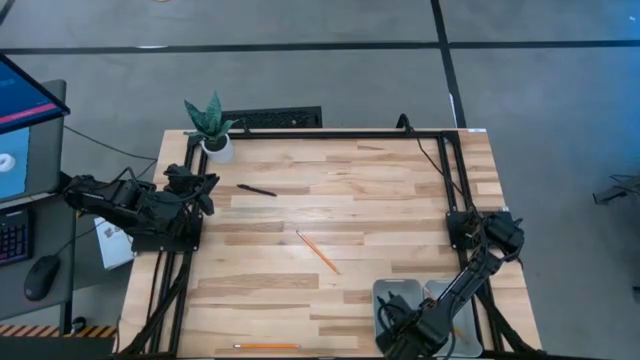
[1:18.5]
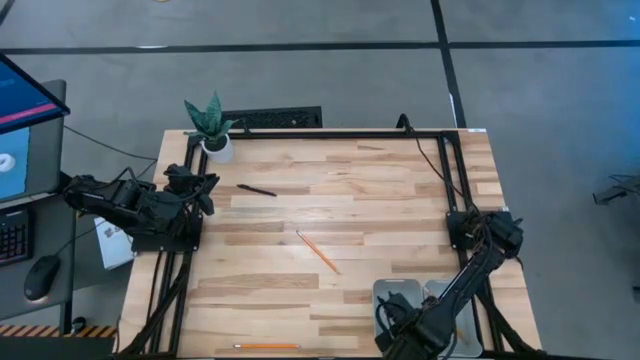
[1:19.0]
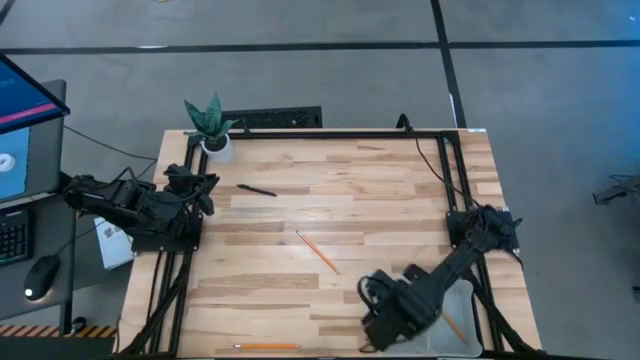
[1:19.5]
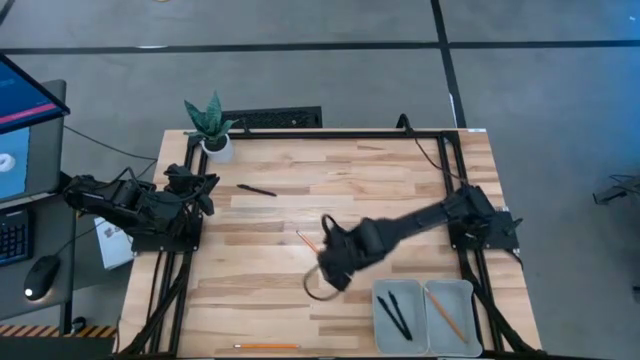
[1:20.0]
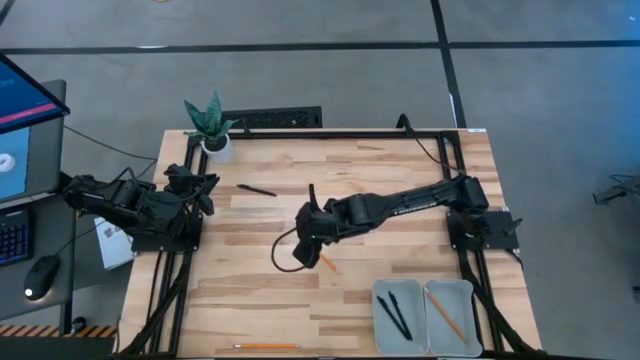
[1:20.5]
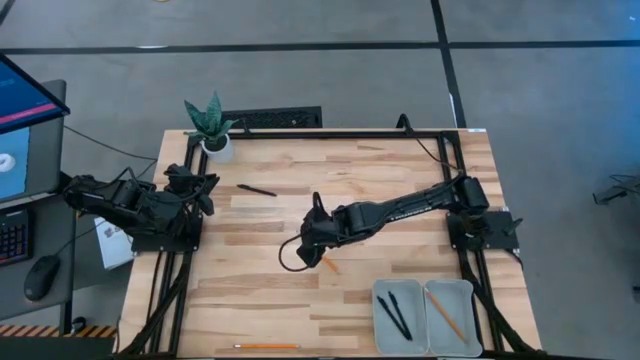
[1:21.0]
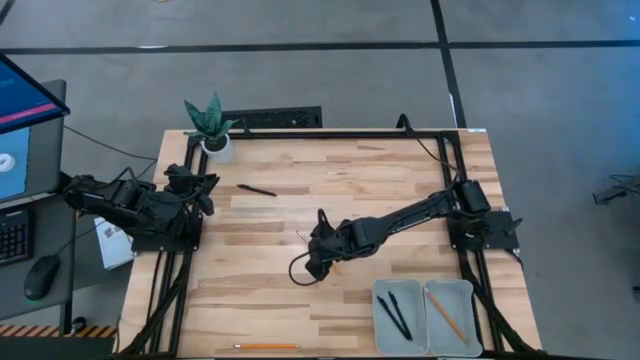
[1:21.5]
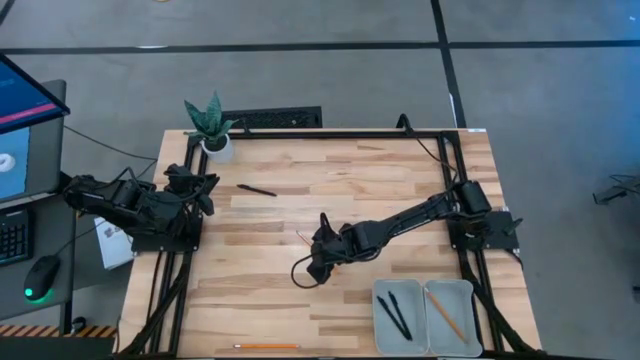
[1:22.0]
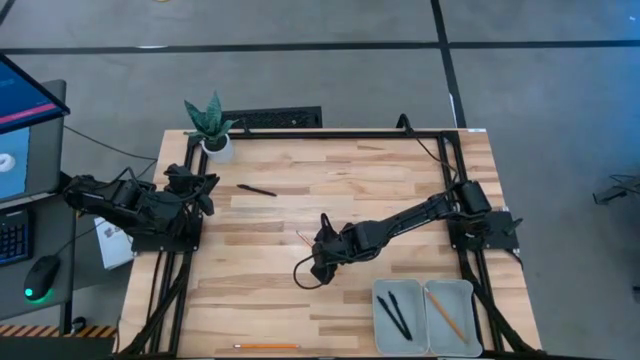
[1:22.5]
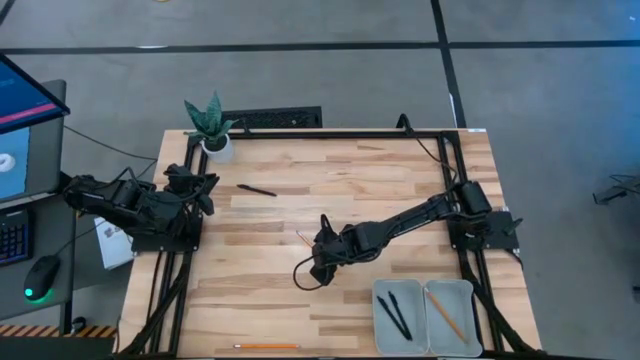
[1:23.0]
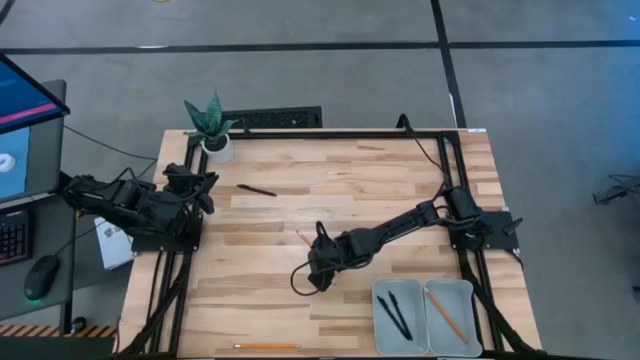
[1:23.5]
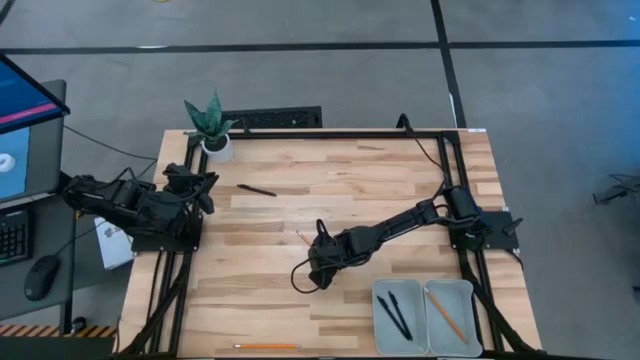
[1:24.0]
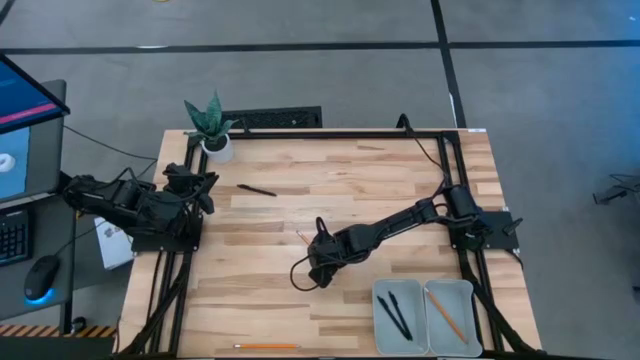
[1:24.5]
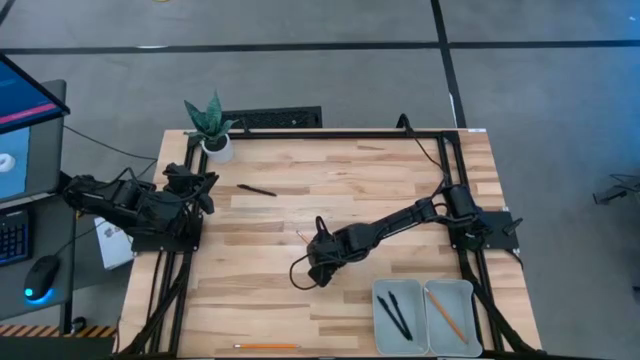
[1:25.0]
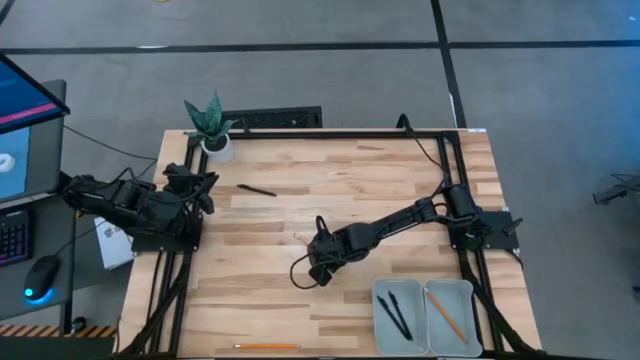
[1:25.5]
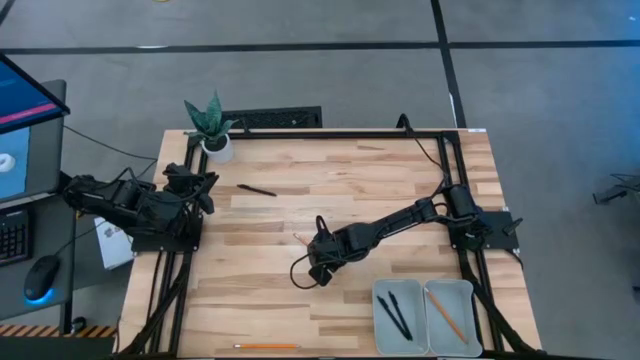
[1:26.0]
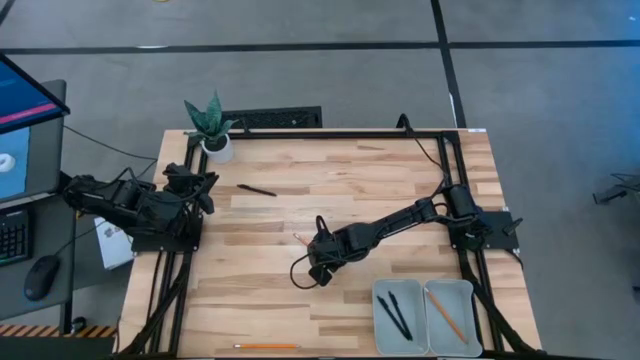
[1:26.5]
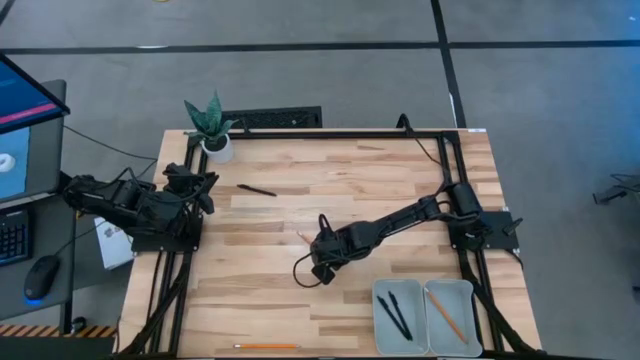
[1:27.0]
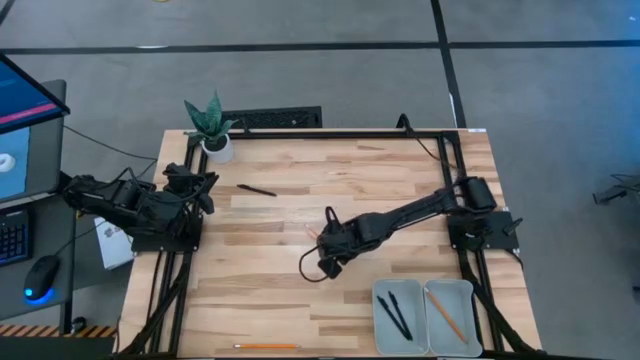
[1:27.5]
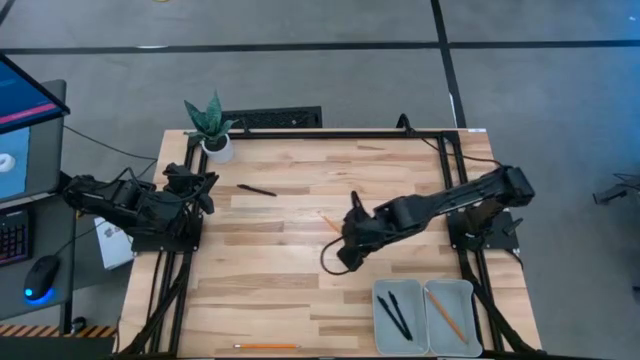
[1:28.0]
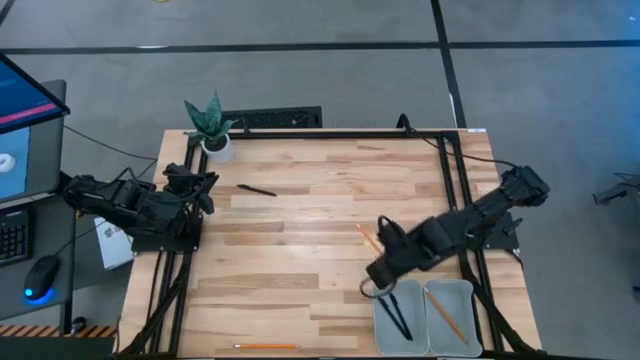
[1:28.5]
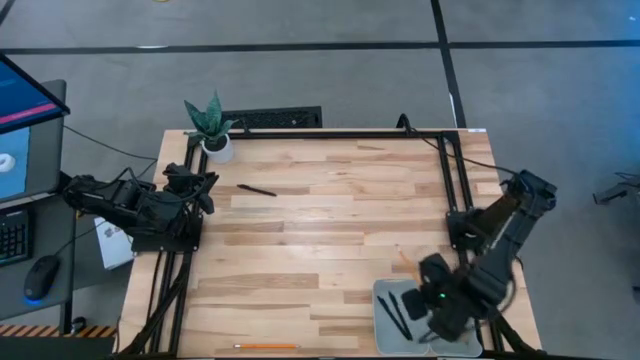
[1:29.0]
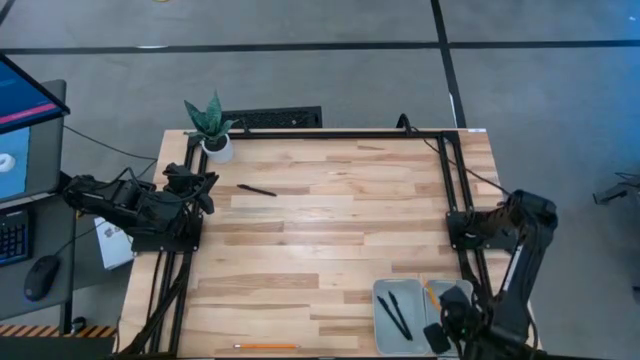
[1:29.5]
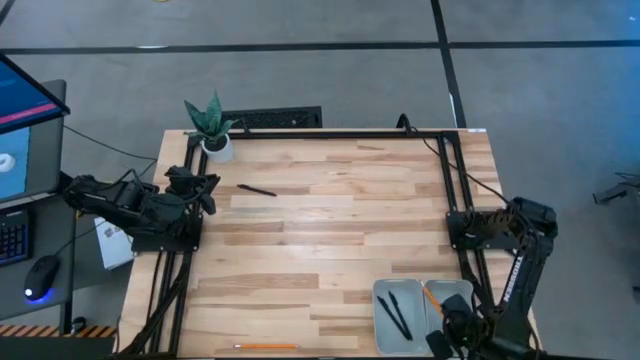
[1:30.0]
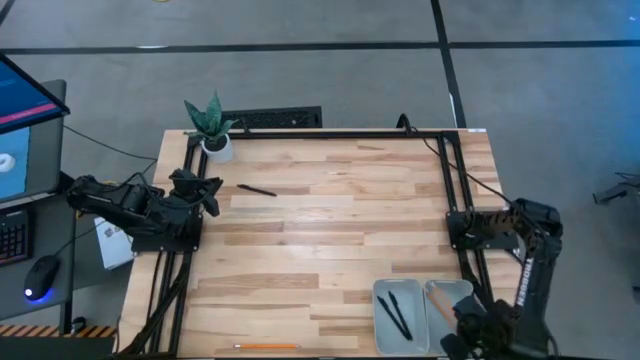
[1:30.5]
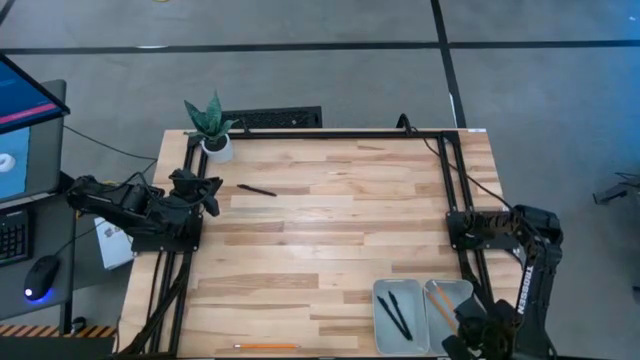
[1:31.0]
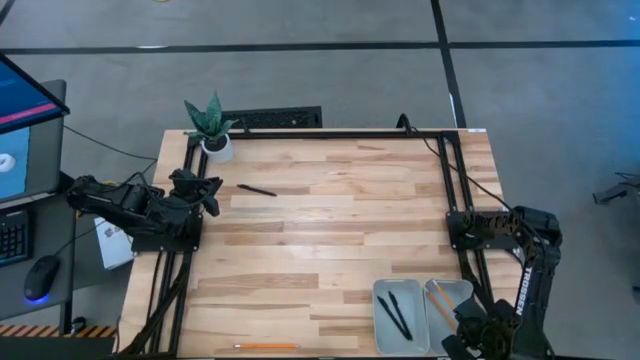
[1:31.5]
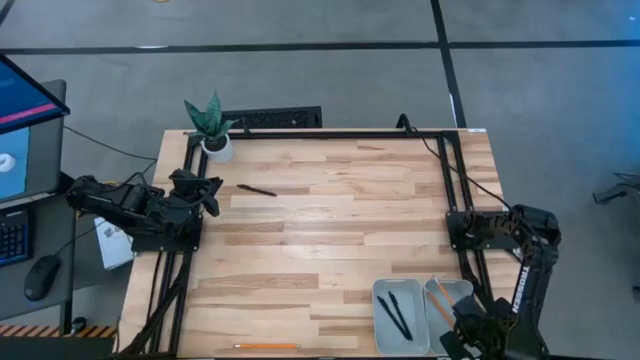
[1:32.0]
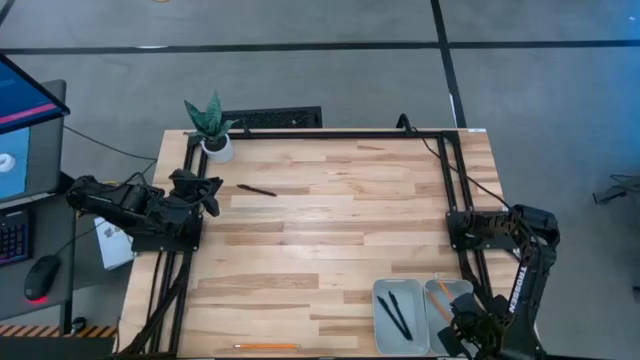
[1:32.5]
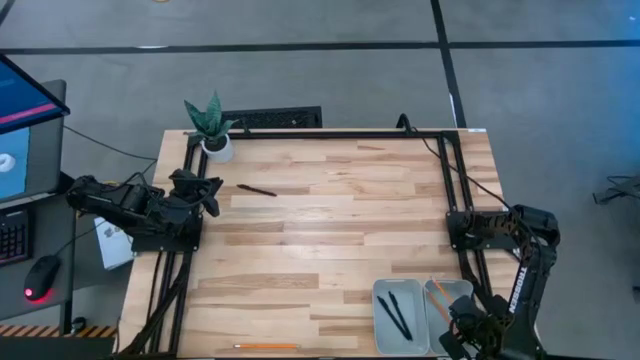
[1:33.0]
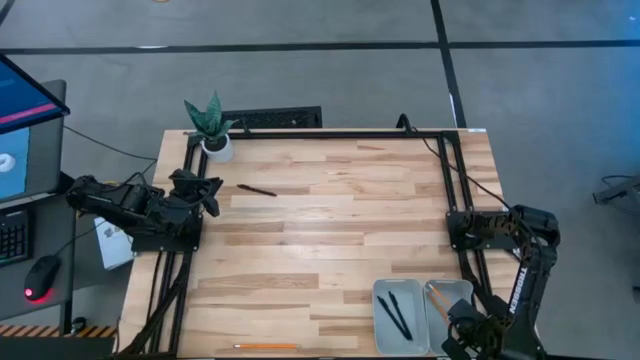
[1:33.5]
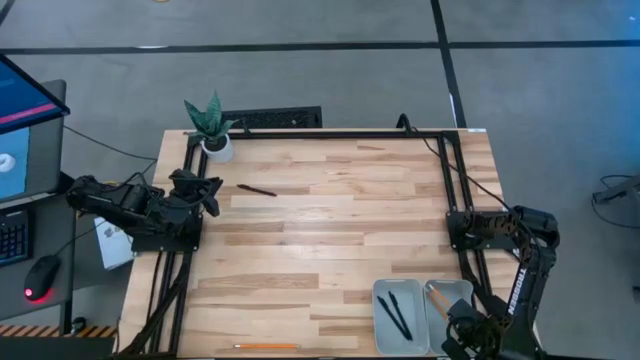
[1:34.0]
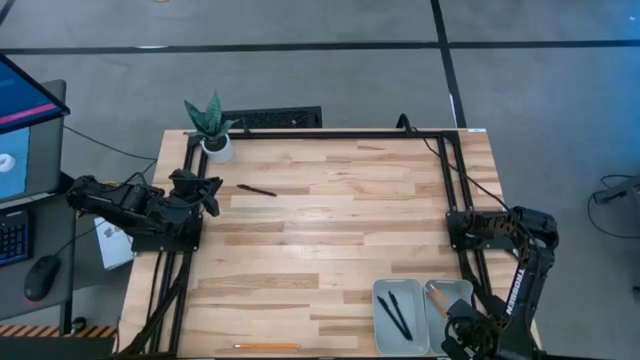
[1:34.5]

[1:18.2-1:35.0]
Task: Sort pens & pencils
Put the center orange pencil into the bottom right gray bin

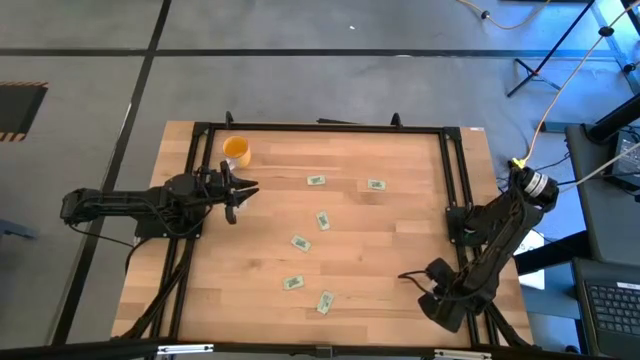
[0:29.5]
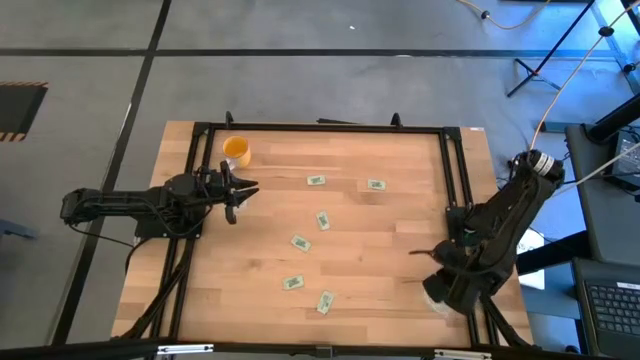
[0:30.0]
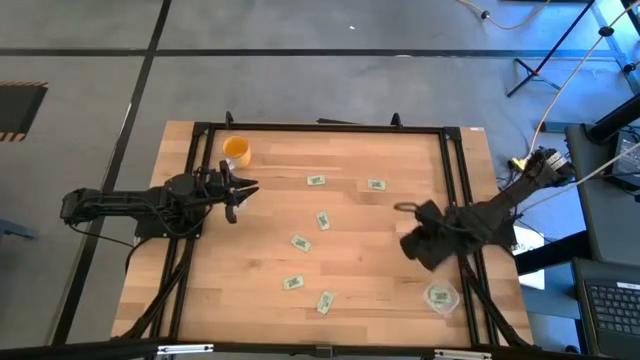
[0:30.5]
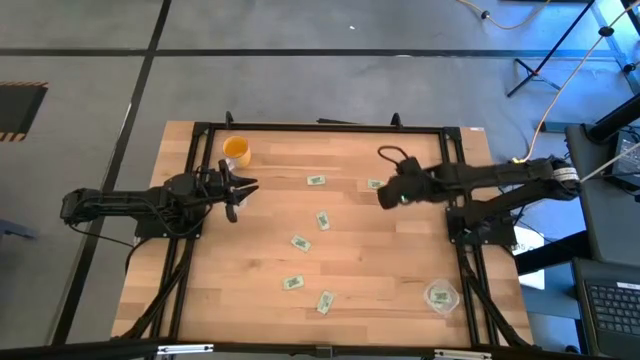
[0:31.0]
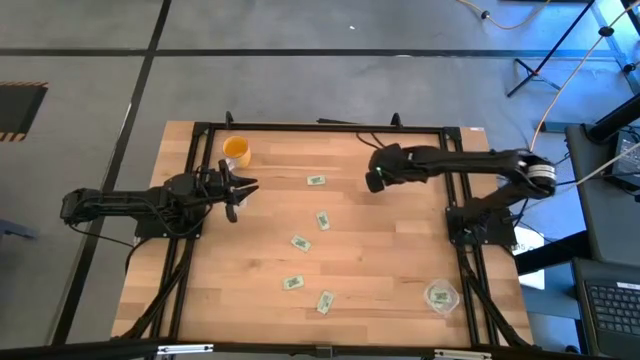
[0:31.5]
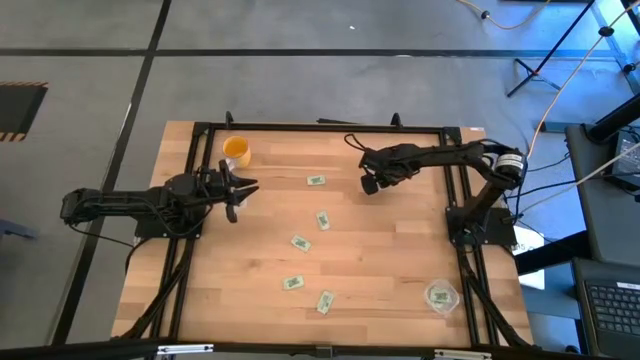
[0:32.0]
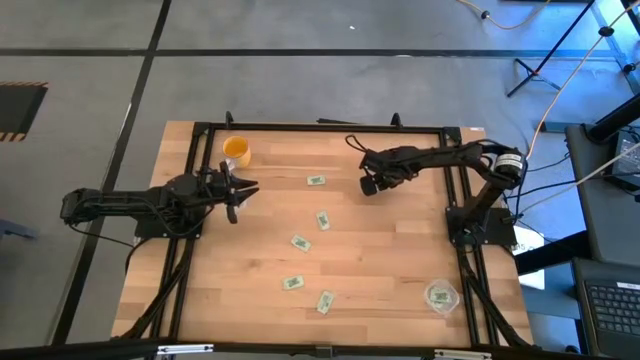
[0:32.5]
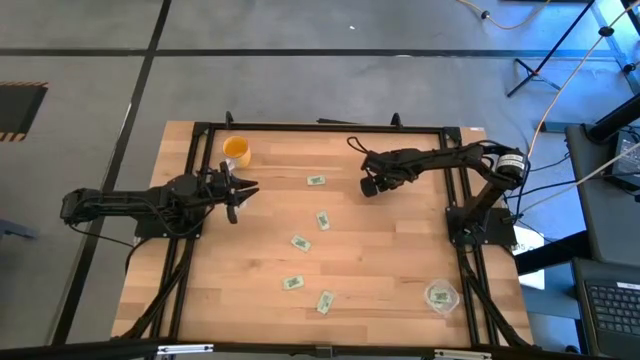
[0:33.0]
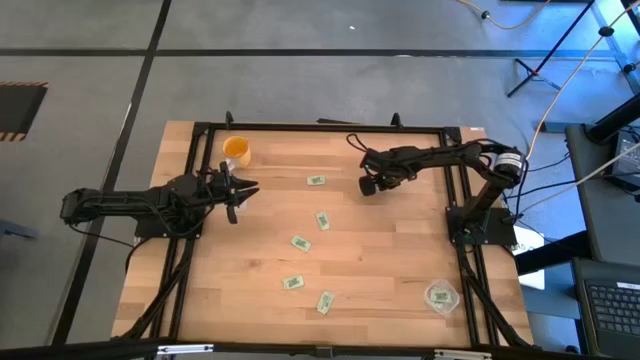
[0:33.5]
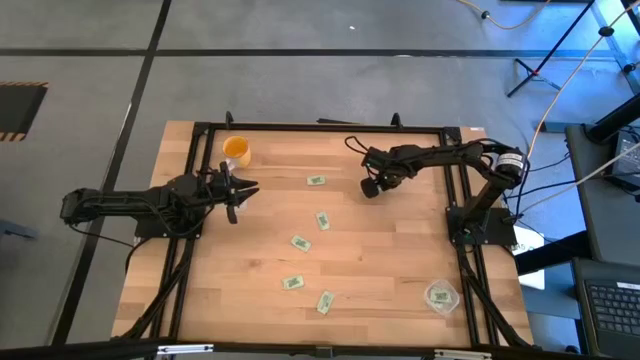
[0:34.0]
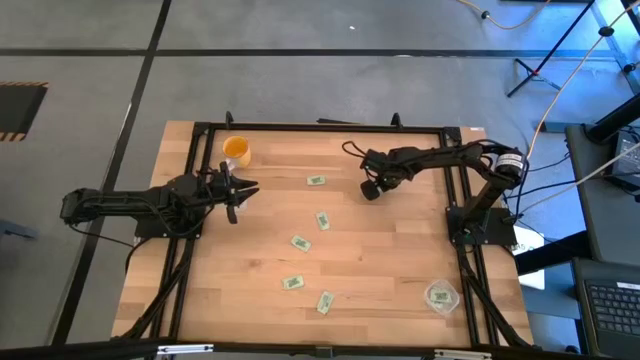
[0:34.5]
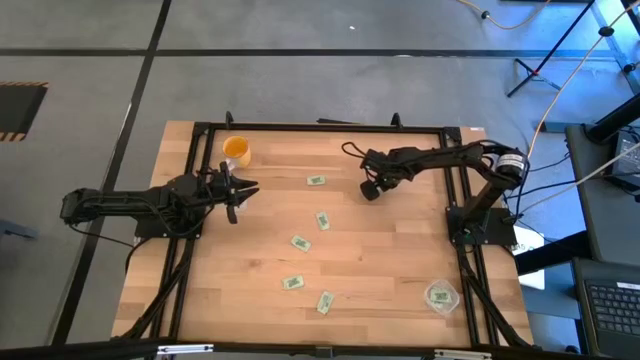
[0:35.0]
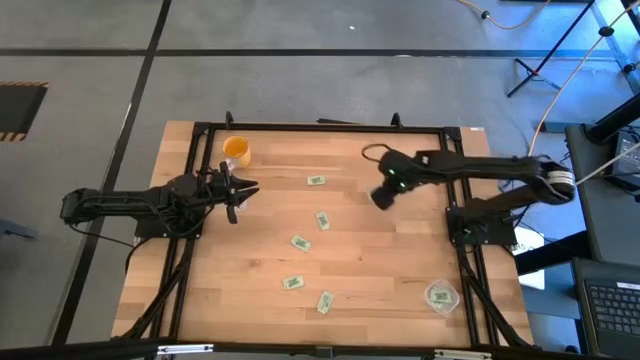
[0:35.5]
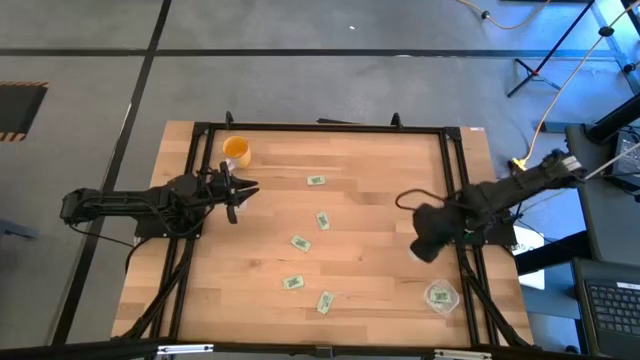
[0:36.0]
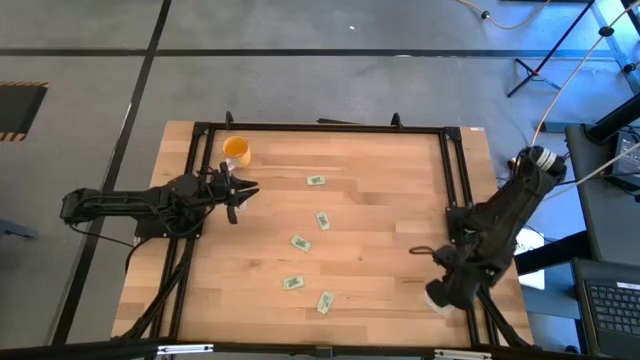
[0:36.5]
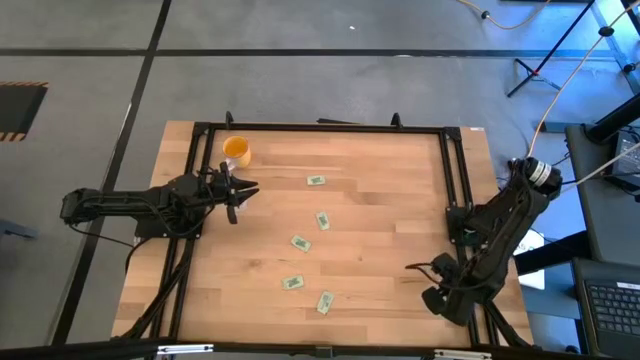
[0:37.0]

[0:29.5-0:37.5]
Task: Pick and place items into bin
Put the green stevia packet into the bottom transparent bin
